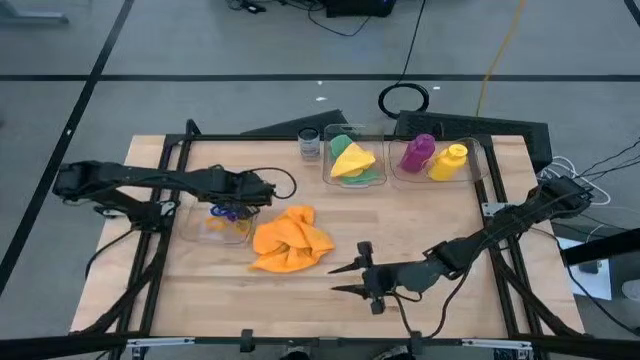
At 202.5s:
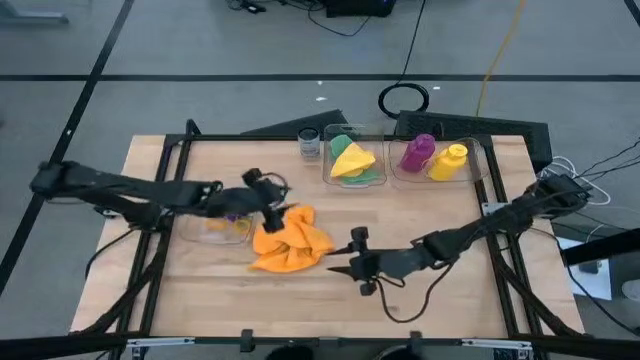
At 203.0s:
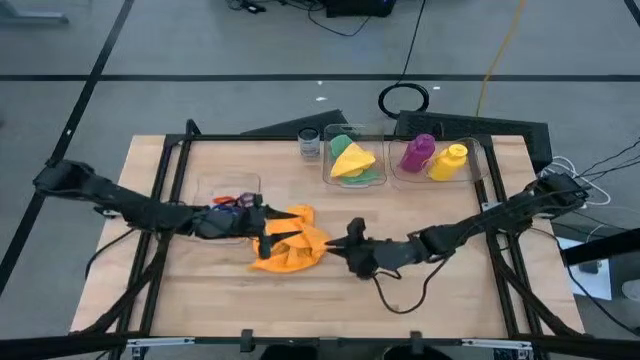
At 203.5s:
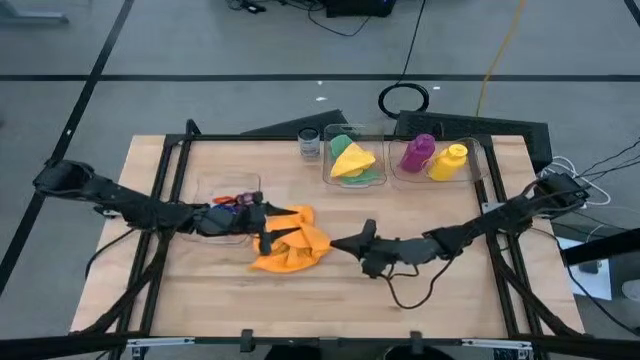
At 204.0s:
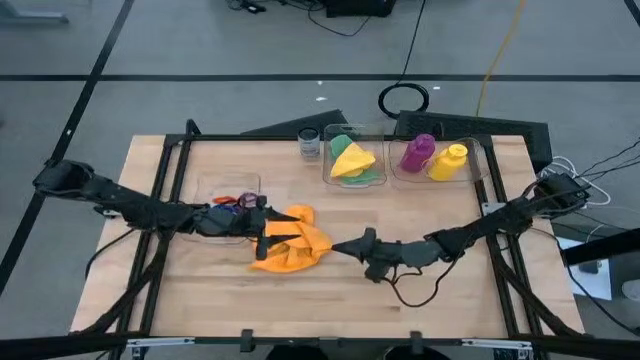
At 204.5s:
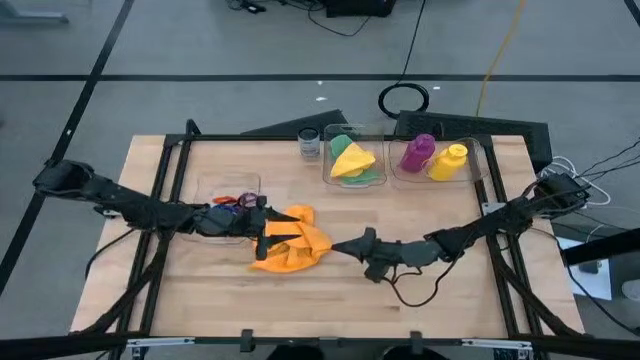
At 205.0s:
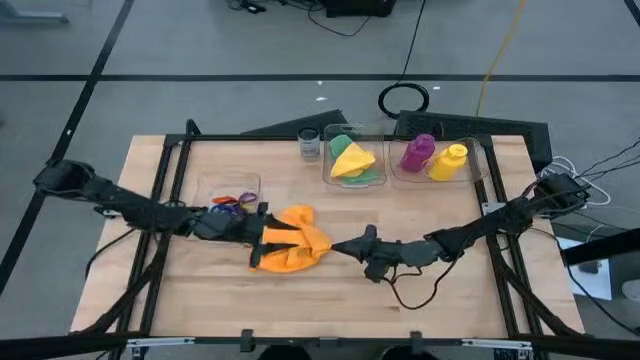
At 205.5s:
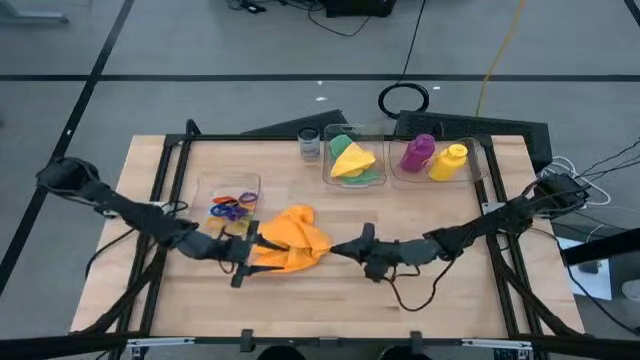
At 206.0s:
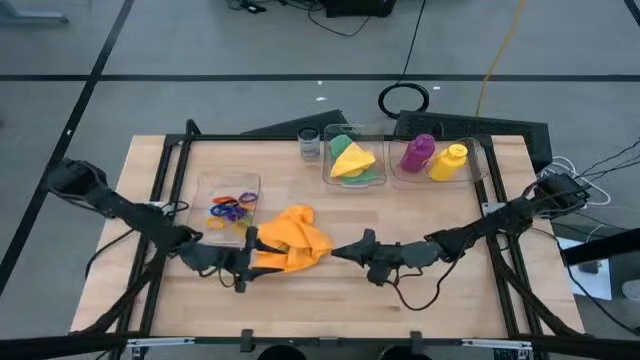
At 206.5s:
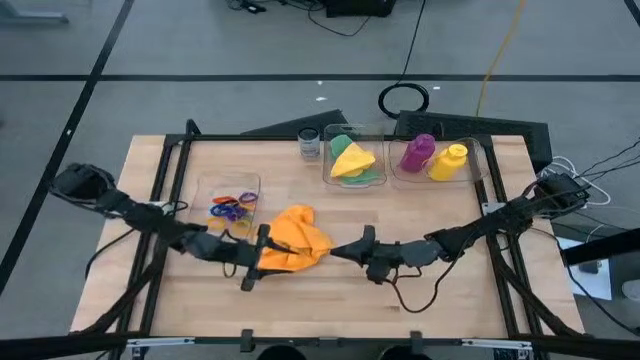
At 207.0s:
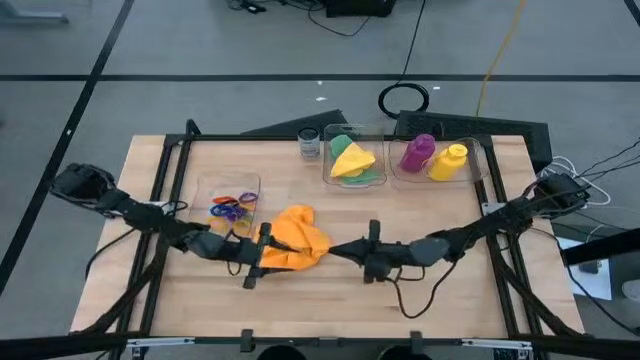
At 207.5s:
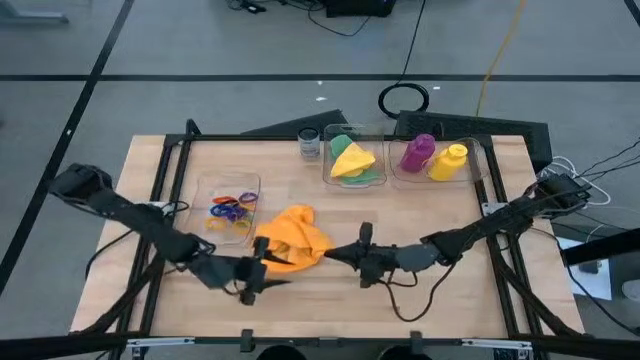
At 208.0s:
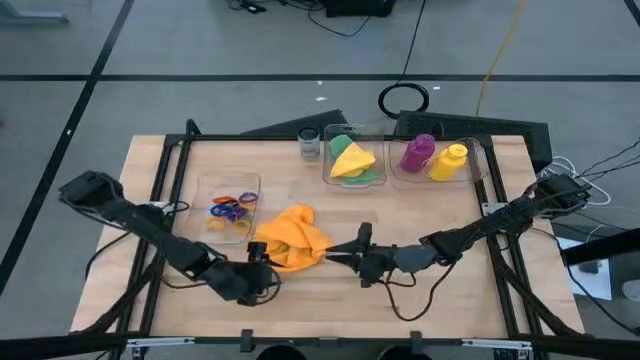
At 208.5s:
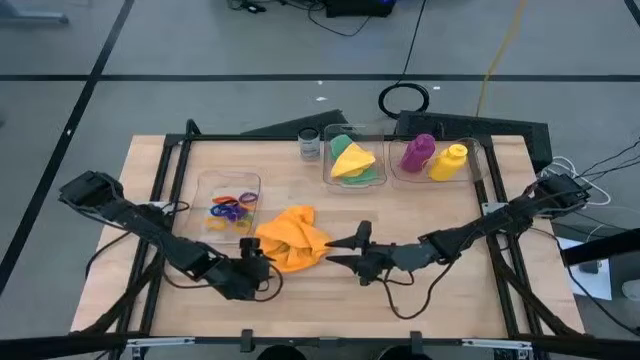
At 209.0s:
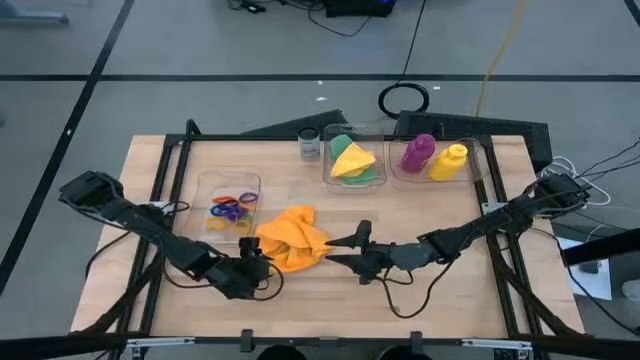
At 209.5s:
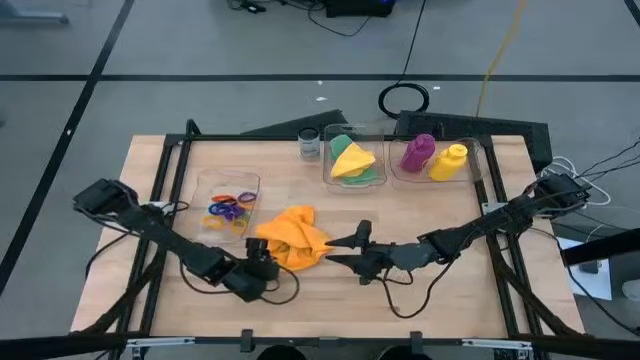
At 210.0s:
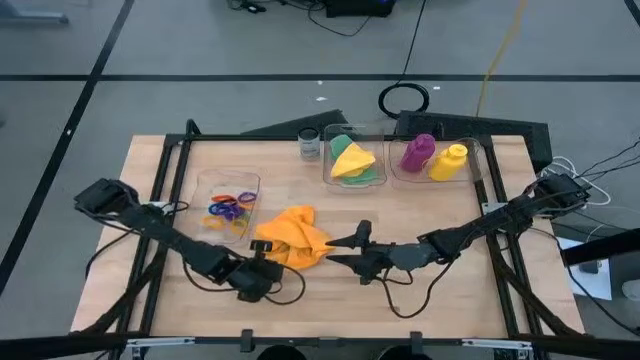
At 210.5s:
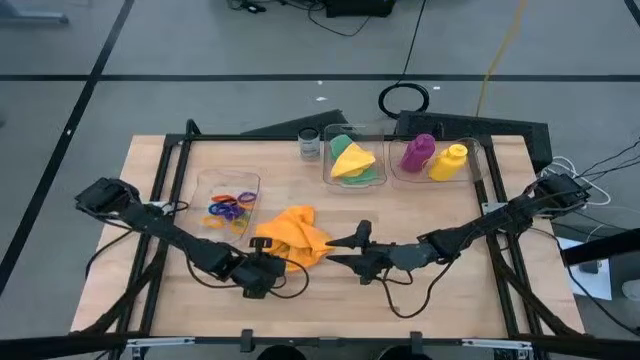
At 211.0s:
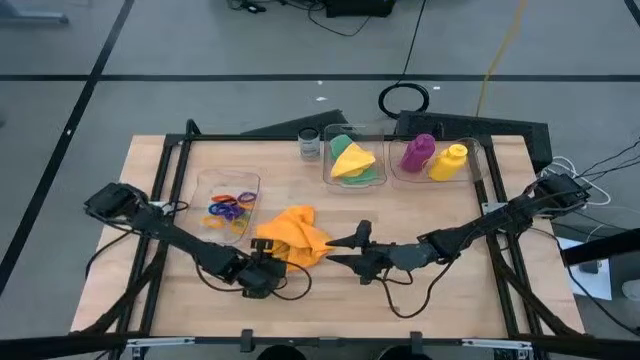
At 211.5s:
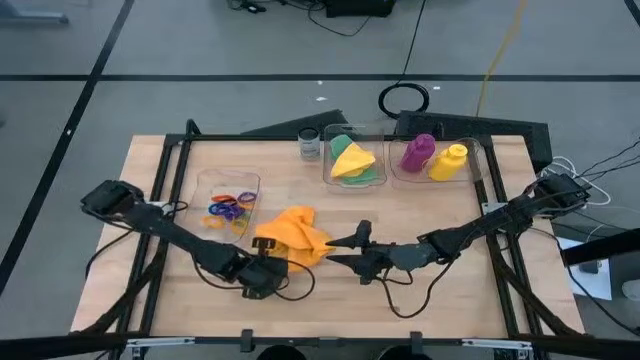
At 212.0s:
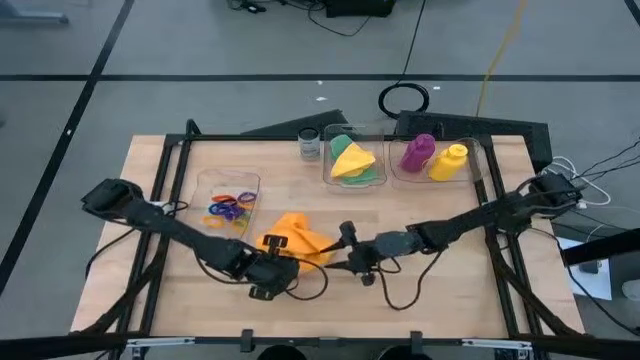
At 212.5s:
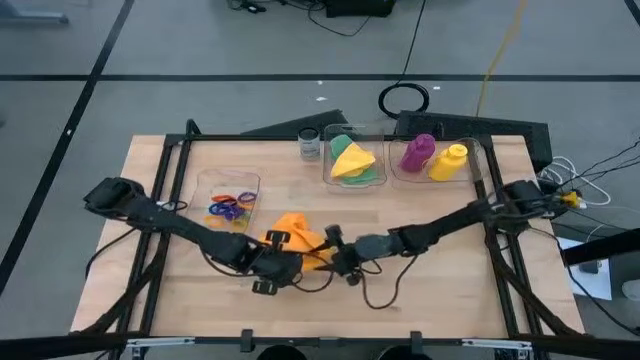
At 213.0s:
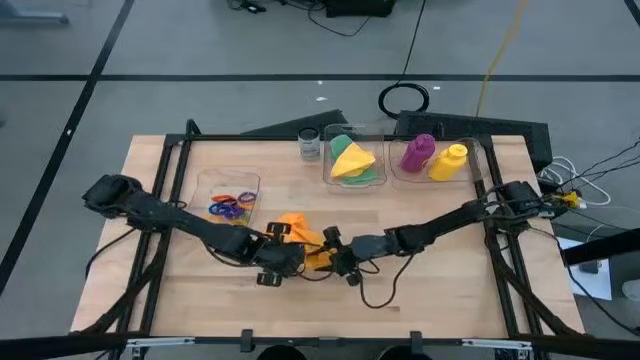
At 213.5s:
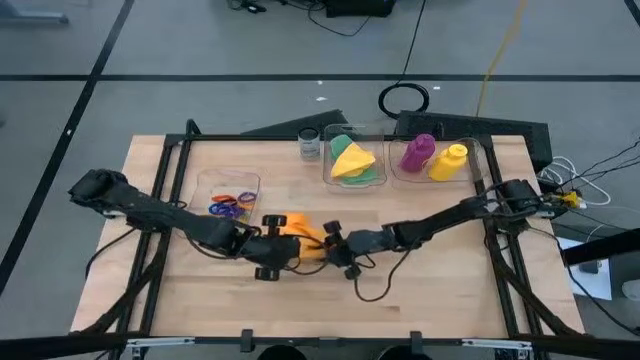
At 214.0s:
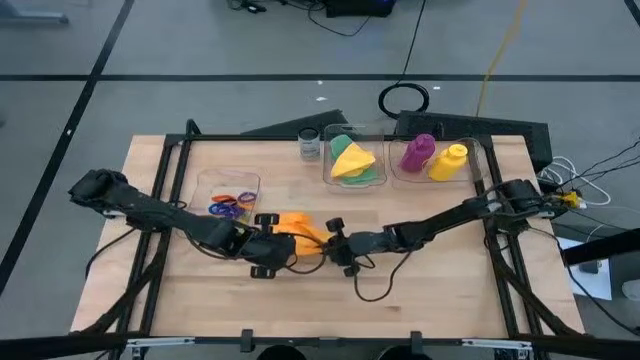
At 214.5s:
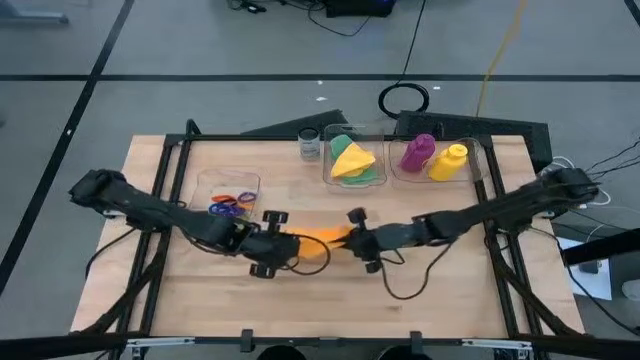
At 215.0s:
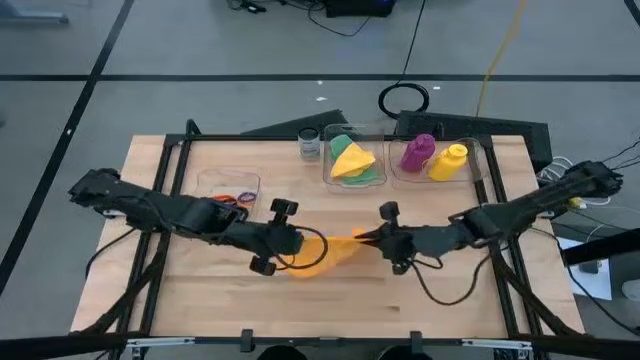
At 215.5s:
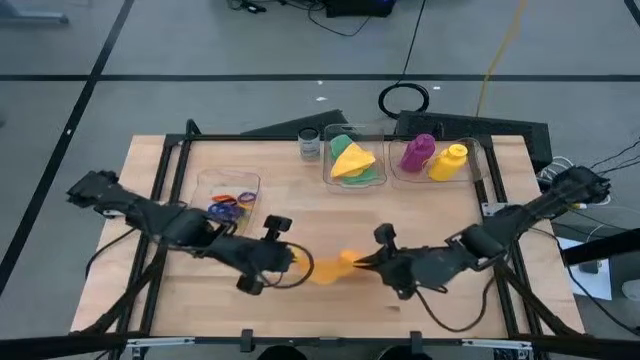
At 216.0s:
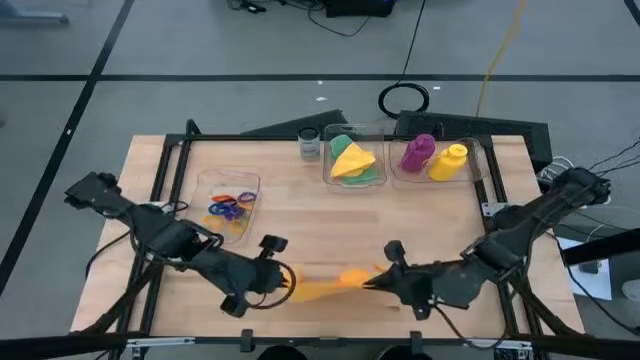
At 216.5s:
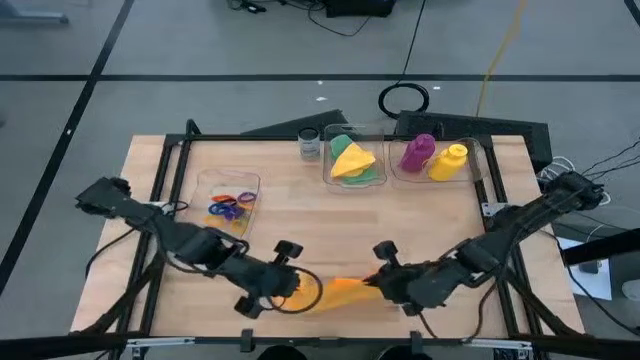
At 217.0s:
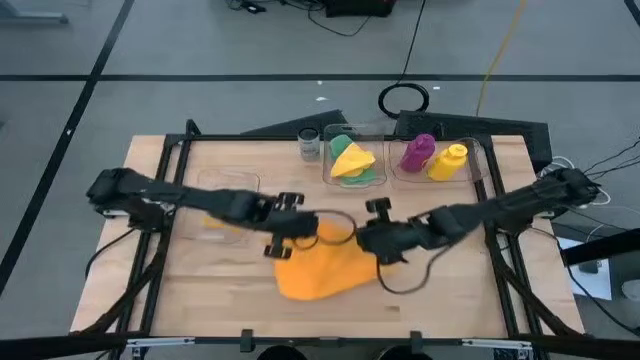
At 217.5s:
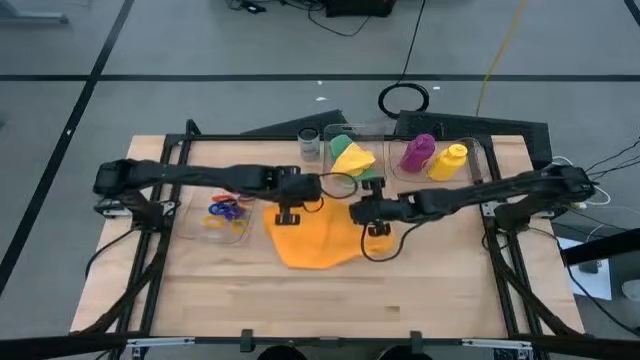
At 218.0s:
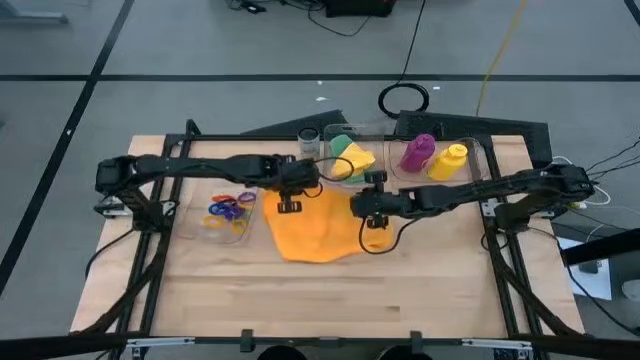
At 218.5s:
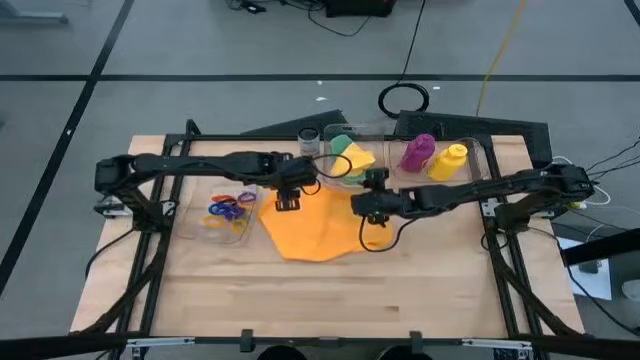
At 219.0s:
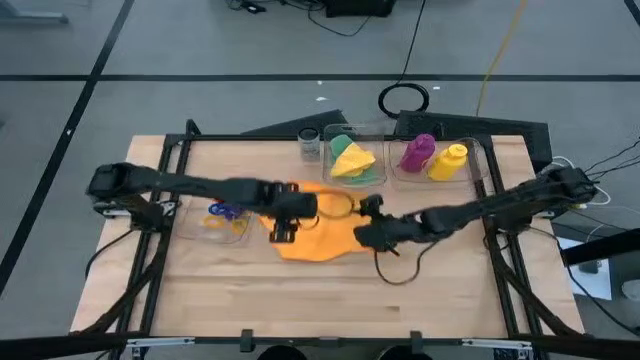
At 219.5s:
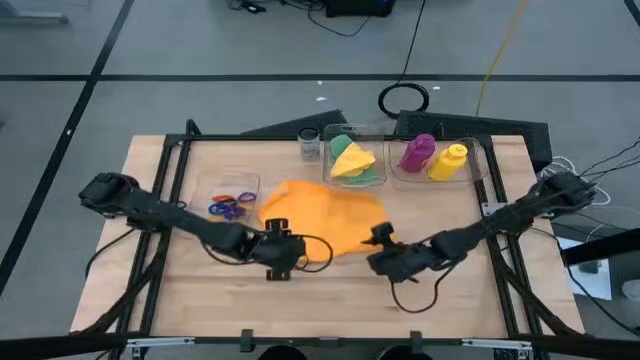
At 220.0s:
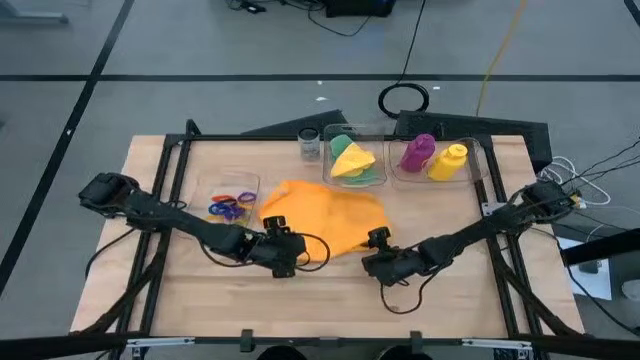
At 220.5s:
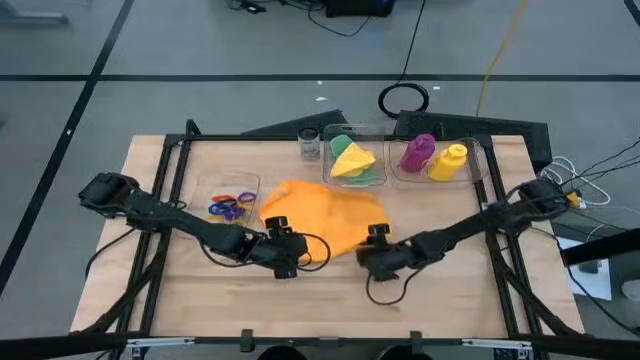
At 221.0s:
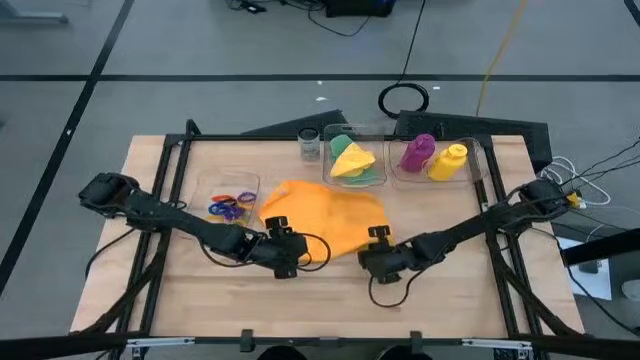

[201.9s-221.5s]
Task: Pick & Place Sports Items
Fold the orange towel
